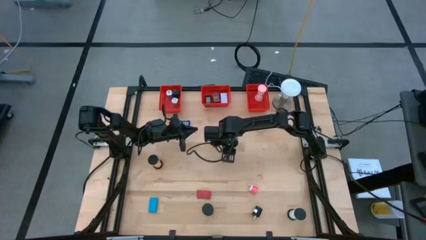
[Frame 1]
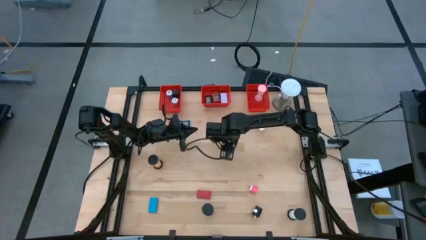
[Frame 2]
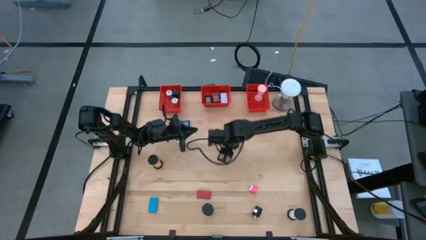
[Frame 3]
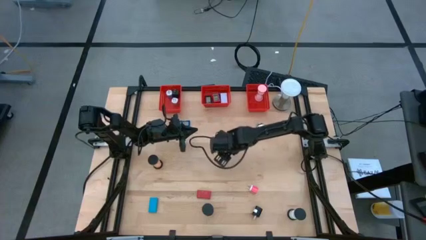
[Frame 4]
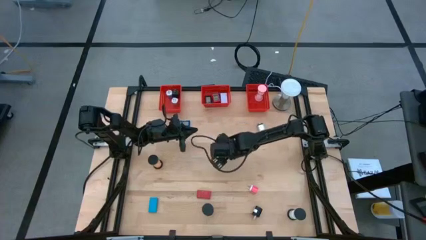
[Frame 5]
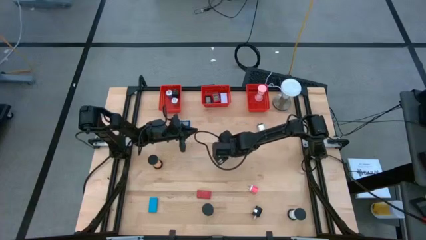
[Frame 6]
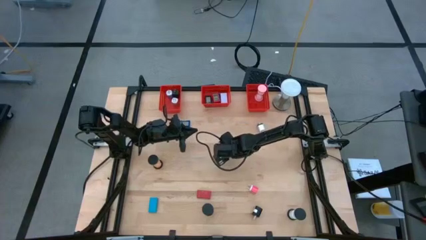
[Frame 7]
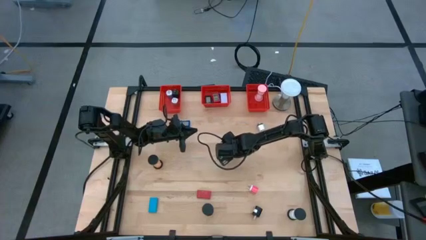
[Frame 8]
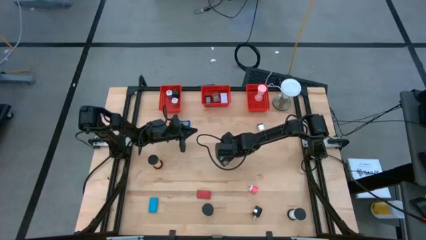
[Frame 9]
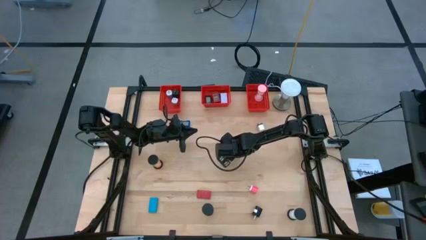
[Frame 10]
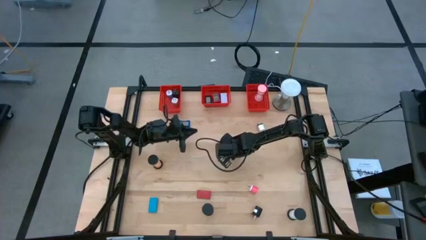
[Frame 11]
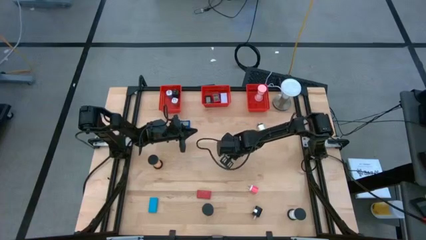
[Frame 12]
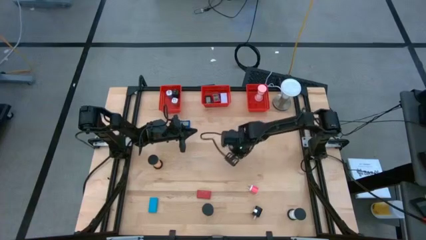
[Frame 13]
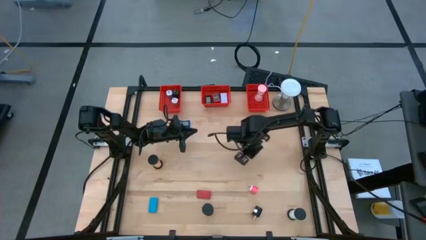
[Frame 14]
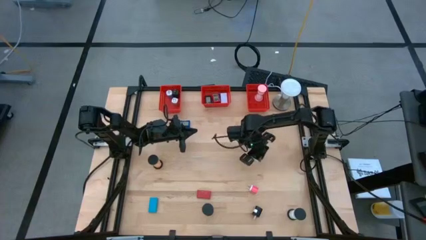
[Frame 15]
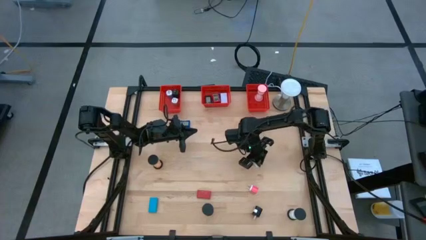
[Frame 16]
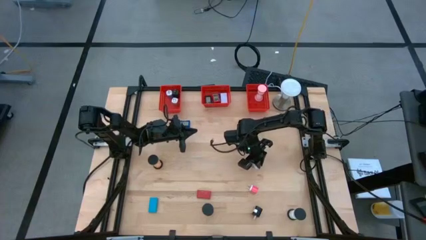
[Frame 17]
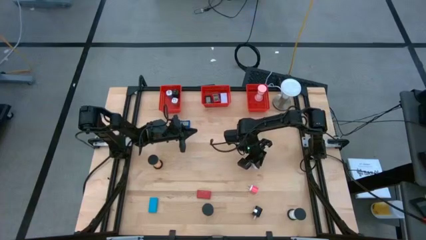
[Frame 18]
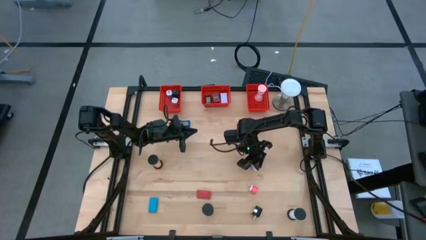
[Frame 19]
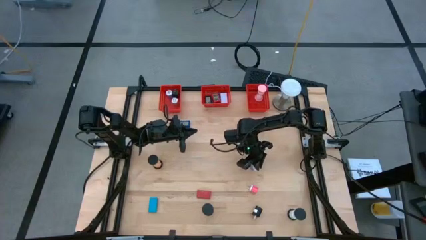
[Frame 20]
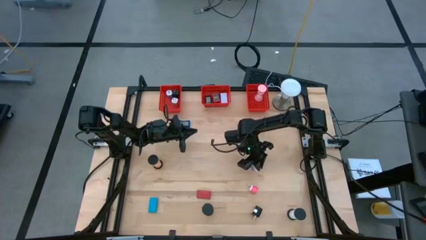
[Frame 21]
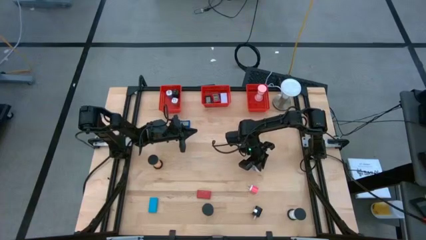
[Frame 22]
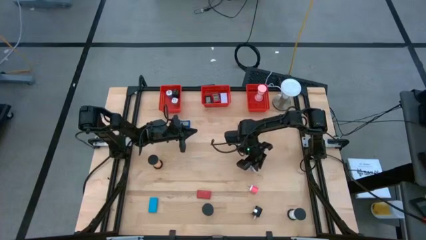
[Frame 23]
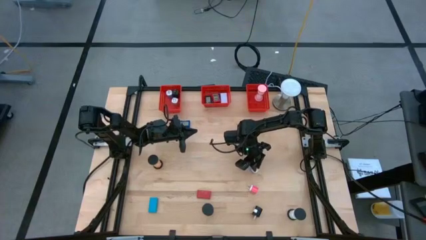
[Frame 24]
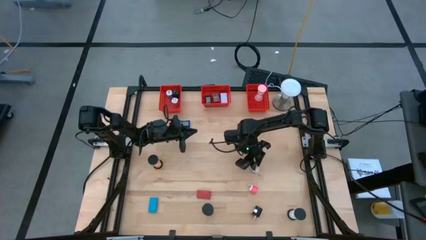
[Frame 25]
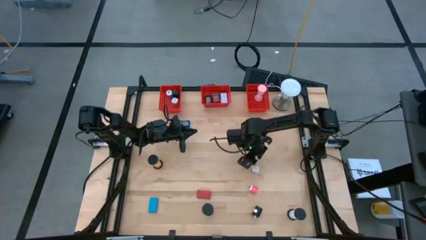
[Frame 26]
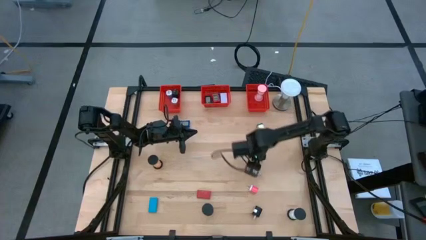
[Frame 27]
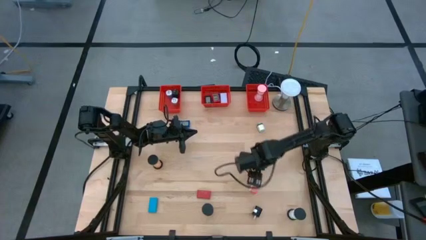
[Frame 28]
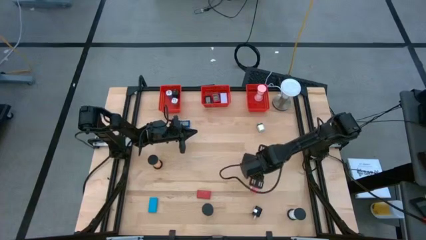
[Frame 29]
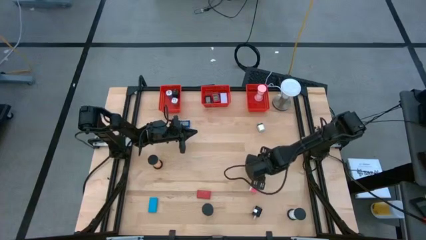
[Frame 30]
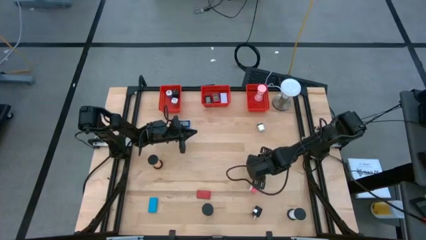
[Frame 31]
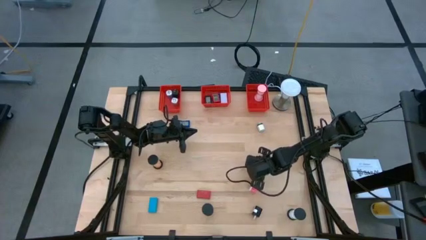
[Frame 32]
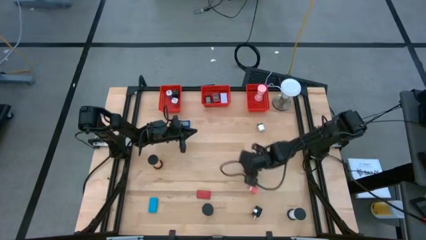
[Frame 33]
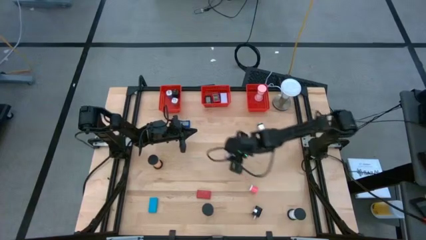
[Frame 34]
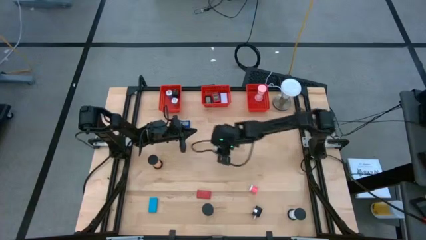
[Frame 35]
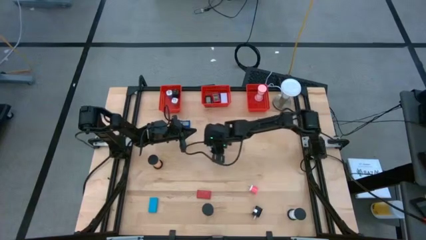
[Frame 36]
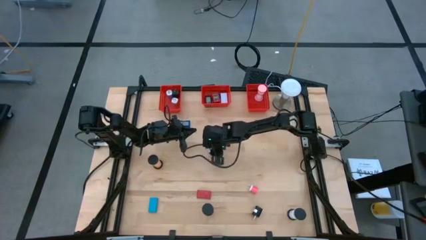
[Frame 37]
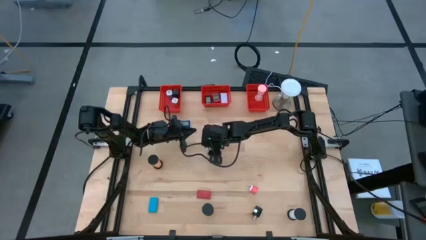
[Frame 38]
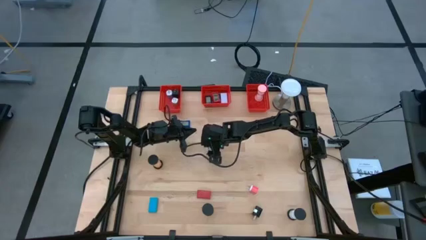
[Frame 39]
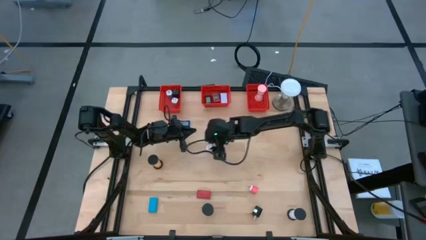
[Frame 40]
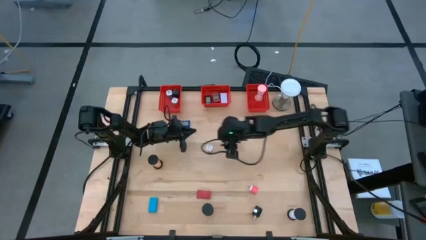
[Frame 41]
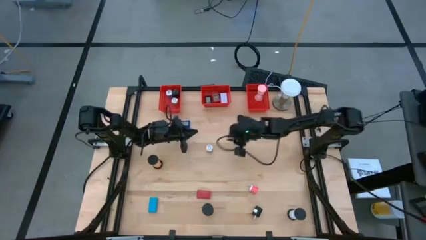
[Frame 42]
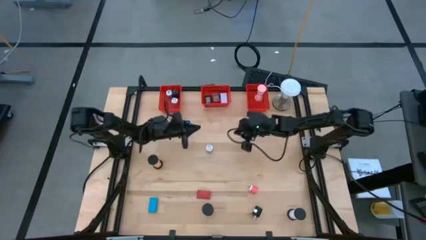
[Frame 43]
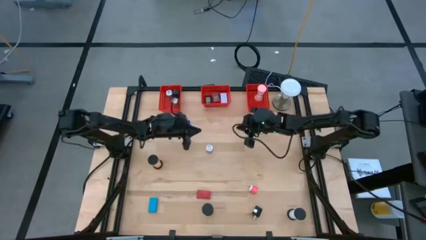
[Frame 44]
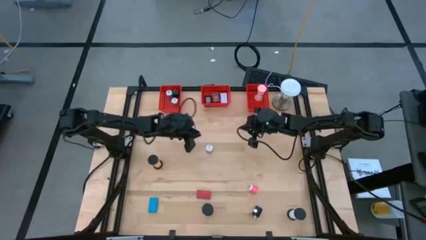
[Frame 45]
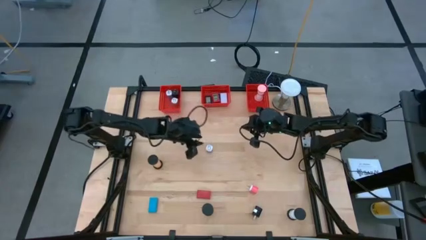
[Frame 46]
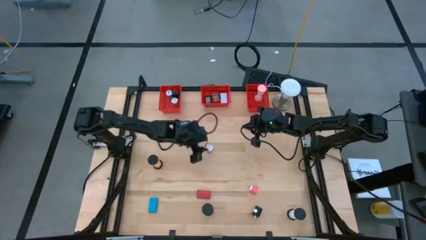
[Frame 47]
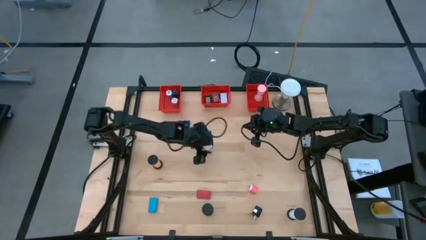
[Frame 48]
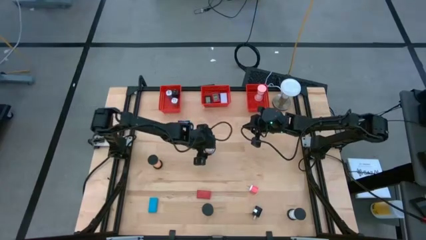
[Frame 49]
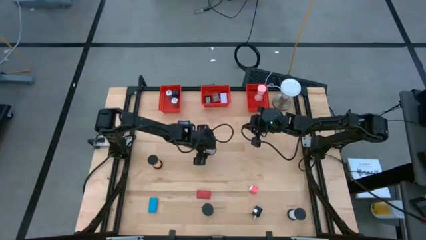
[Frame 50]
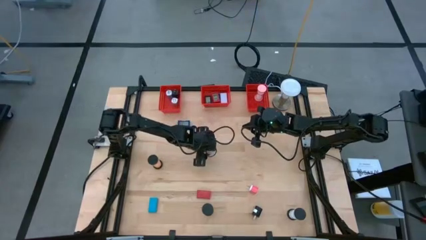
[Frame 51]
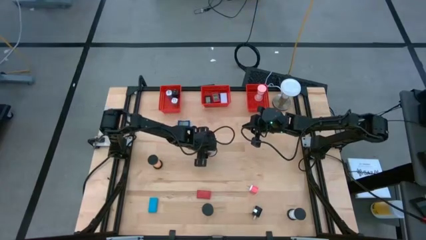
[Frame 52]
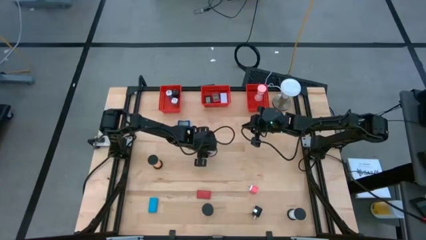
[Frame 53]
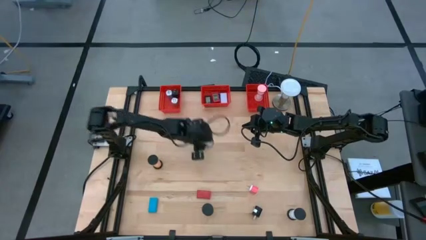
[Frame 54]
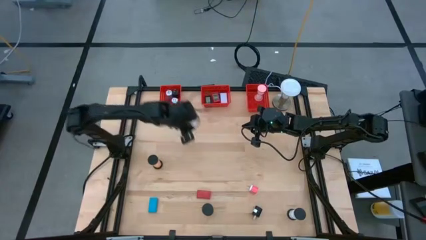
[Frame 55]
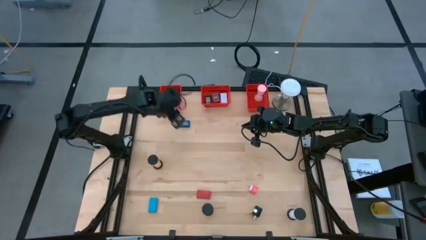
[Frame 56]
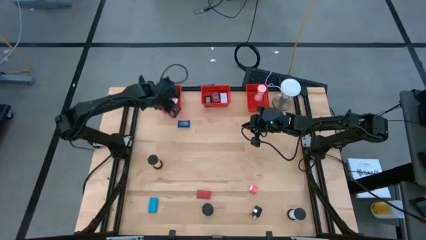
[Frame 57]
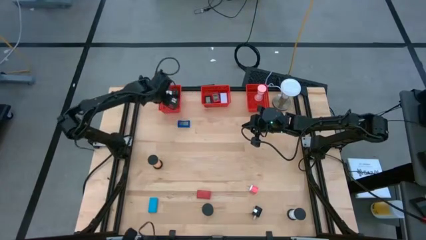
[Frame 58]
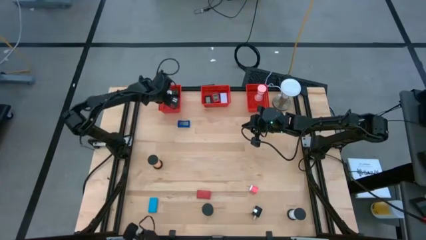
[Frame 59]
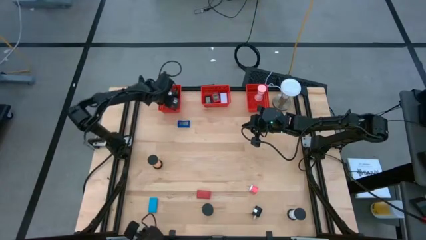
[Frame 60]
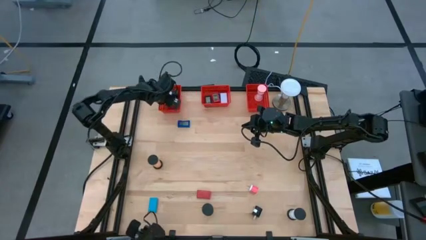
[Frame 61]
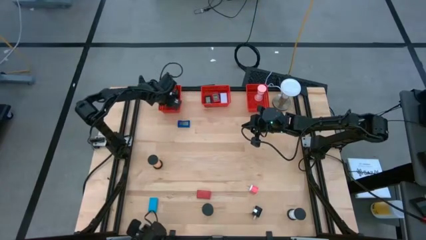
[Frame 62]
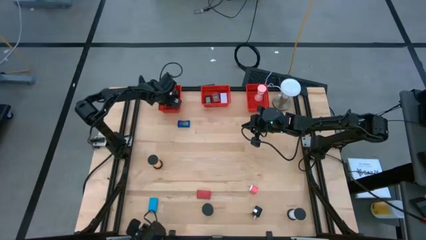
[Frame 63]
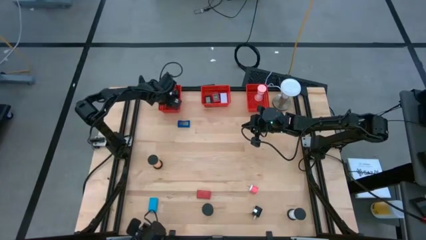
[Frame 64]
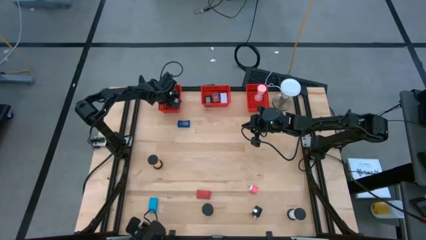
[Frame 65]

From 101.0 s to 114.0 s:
Task: Pick & Place Office items
Put the dark blue charger adapter into the left red bin

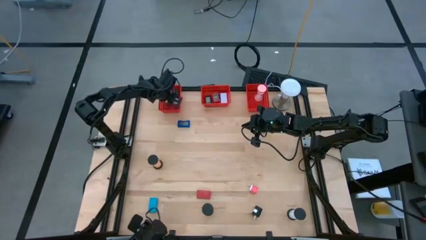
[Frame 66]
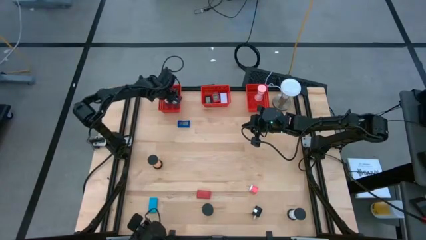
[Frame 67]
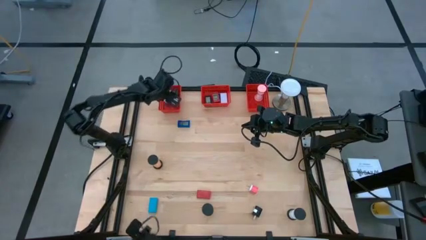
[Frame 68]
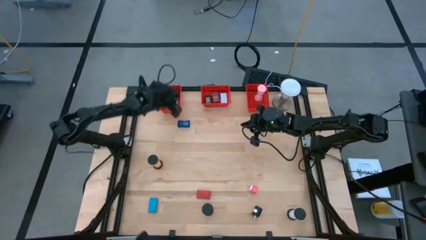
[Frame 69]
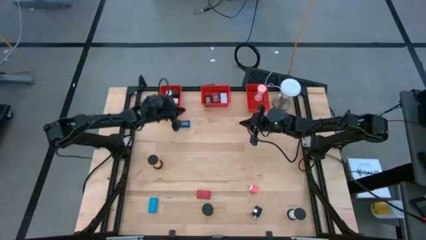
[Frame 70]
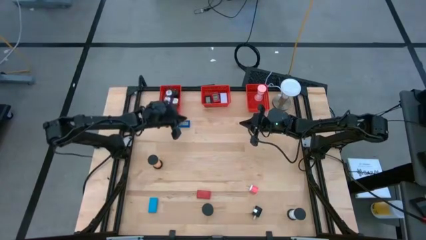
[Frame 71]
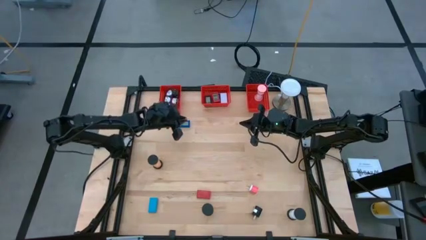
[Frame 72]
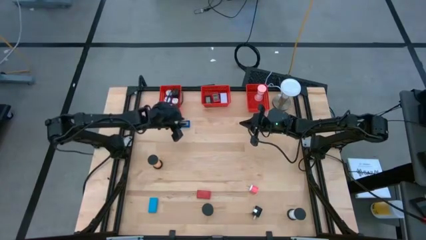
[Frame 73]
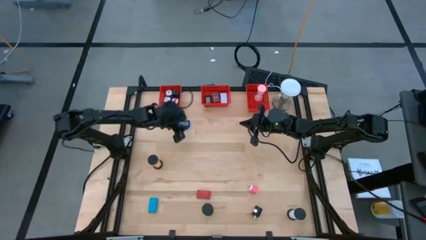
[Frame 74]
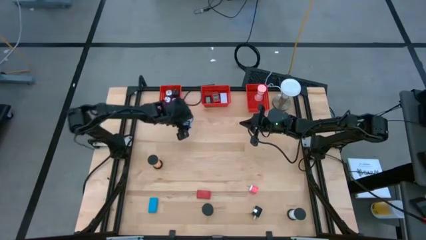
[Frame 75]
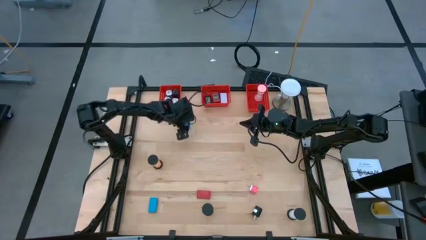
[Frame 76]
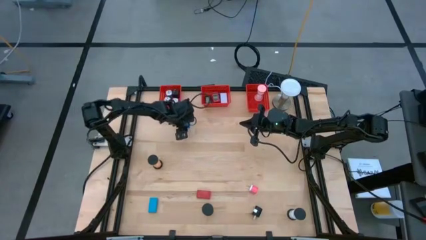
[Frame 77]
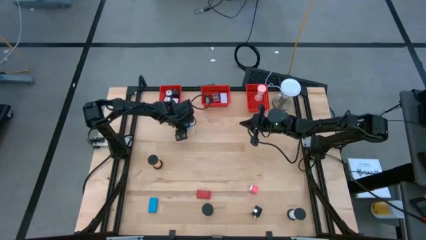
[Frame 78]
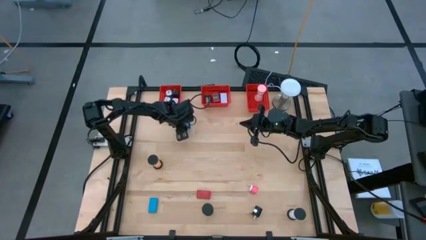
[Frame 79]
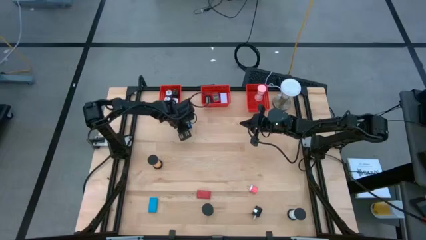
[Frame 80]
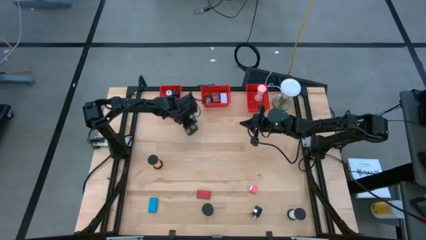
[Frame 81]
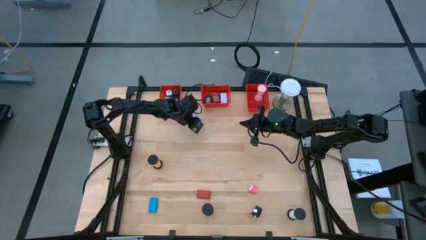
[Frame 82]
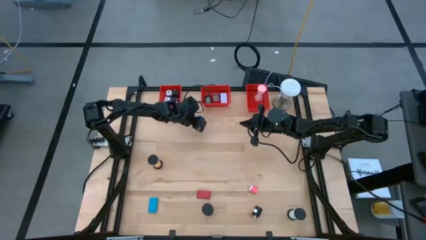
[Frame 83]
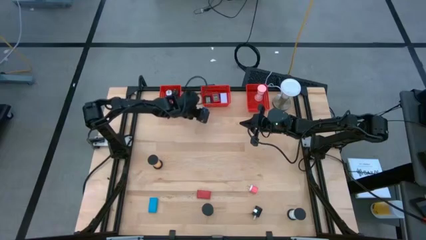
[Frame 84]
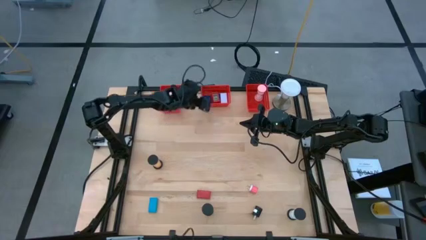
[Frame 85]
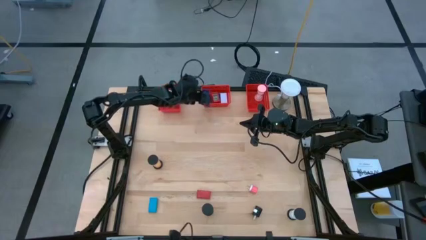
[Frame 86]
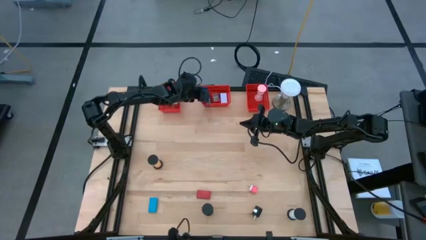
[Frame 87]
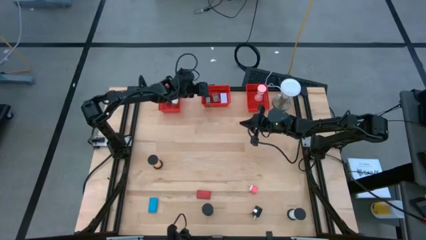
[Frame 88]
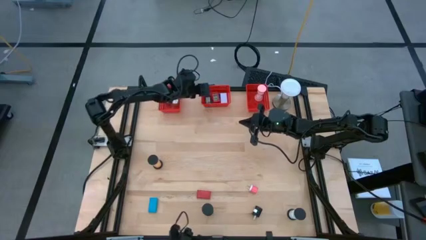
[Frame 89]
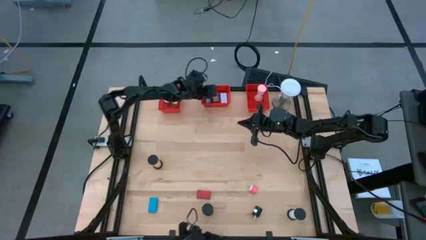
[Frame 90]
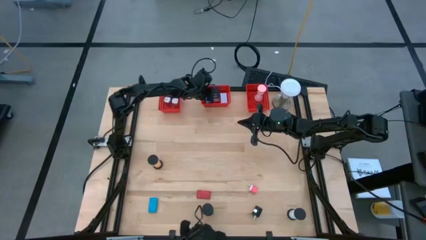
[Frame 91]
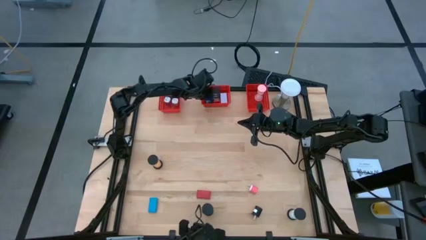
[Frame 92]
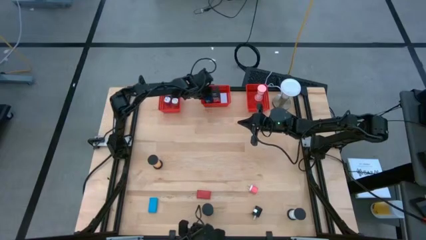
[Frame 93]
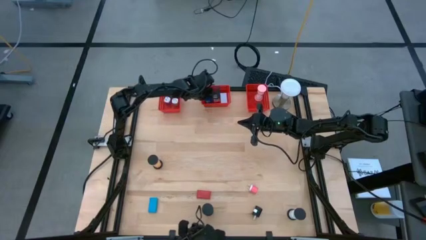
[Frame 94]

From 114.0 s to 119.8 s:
Put the blue digital clock into the middle red bin
